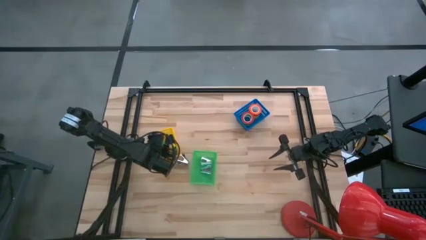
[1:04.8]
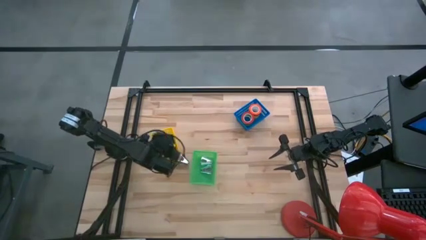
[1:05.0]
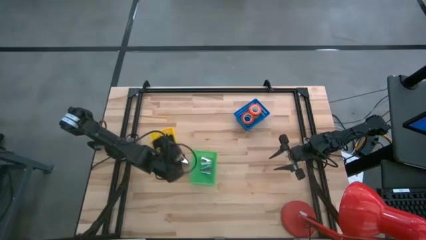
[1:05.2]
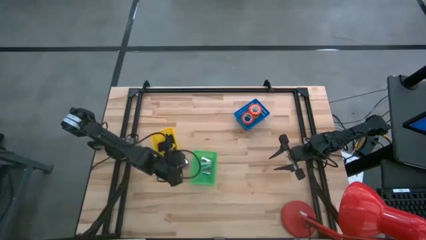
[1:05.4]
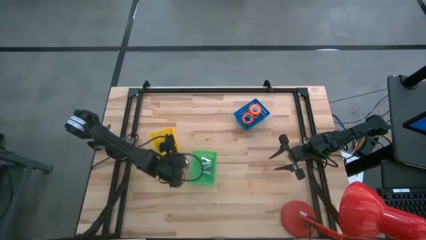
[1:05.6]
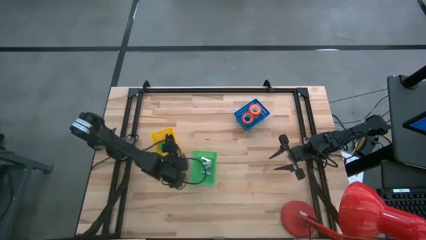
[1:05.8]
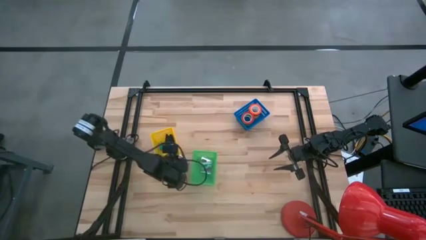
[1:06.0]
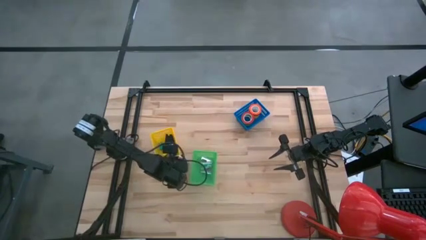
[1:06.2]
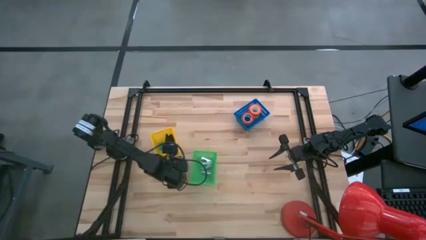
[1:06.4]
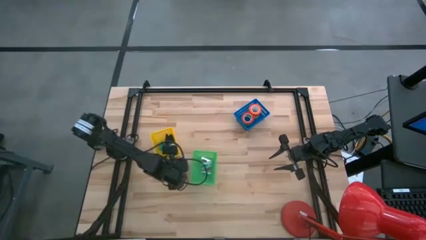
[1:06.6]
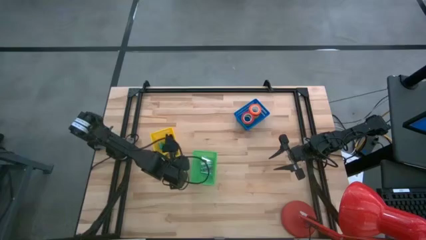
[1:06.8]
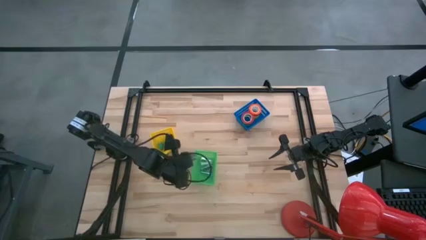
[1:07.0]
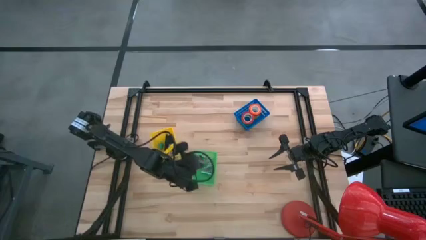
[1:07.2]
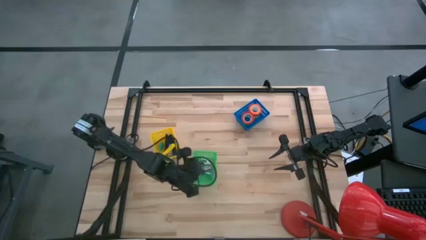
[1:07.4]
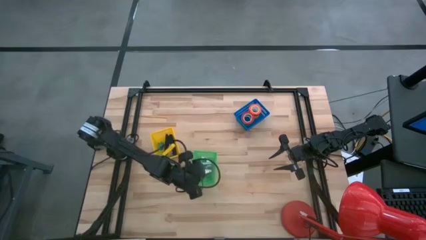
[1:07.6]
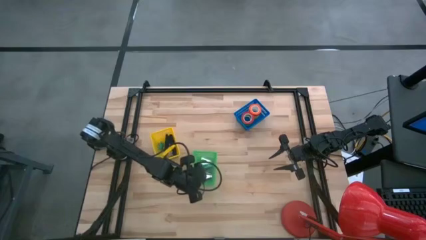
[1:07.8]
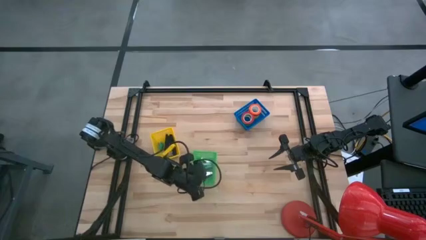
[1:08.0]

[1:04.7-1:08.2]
Task: Pick and place Stapler, Stapler remover, tape
Put the black staple remover into the green bin

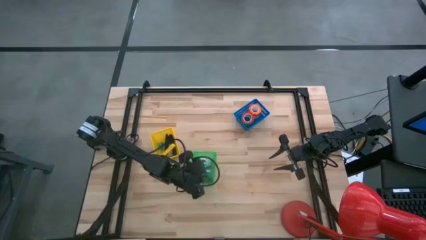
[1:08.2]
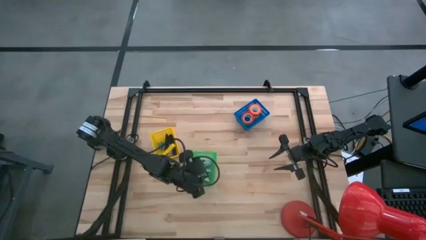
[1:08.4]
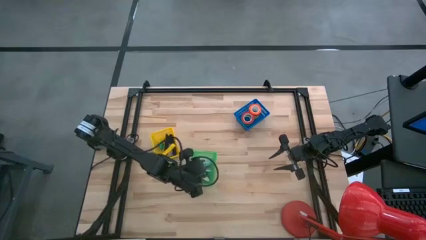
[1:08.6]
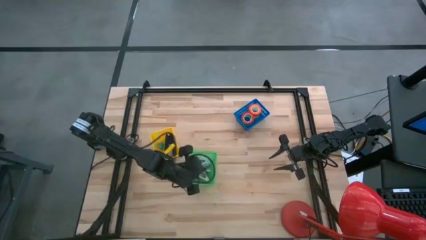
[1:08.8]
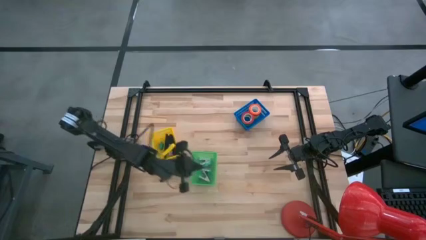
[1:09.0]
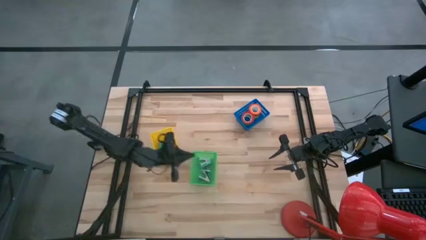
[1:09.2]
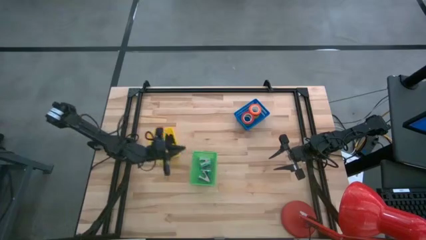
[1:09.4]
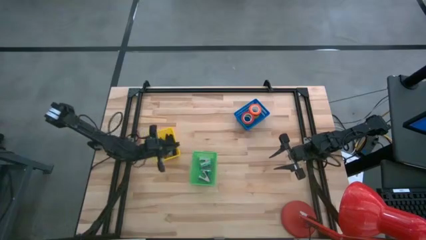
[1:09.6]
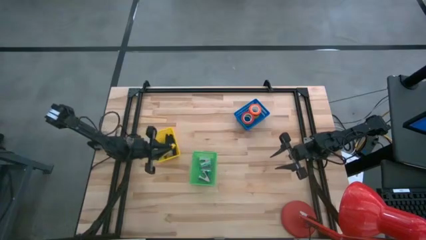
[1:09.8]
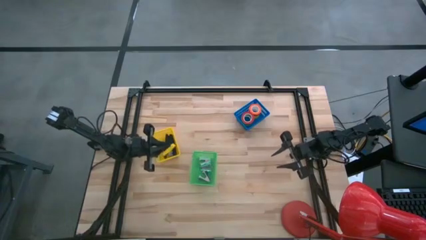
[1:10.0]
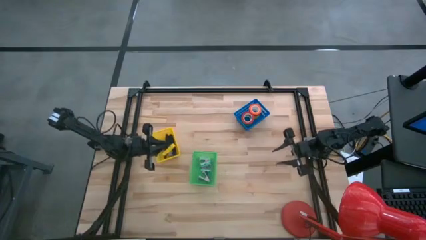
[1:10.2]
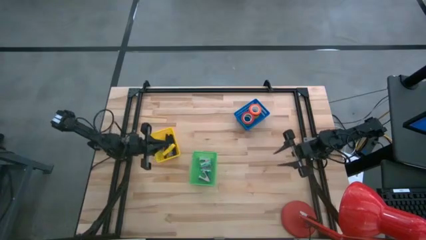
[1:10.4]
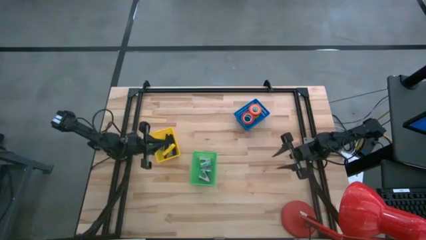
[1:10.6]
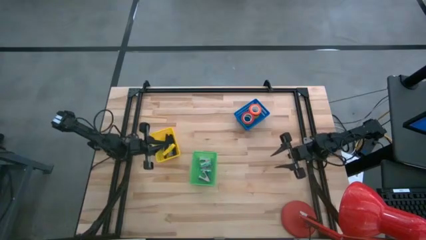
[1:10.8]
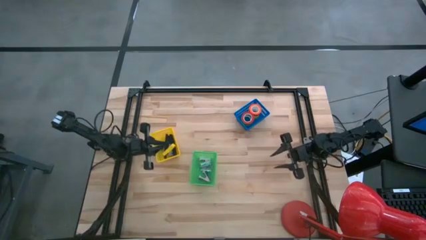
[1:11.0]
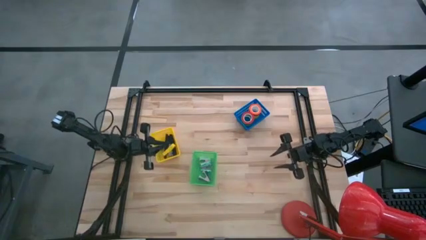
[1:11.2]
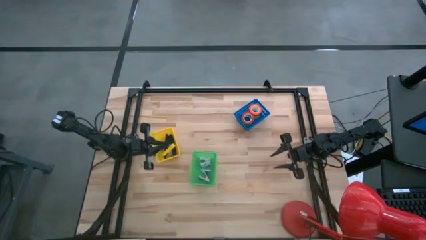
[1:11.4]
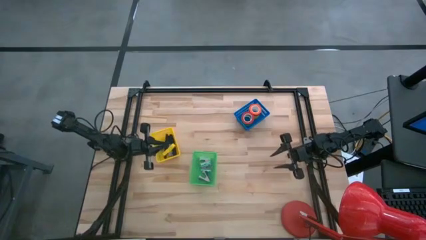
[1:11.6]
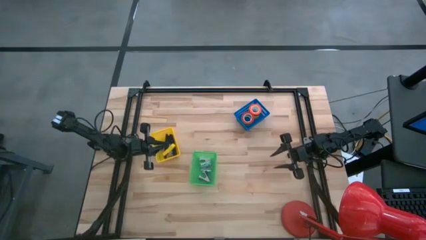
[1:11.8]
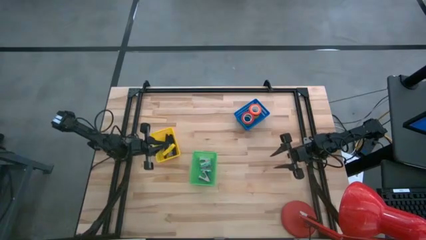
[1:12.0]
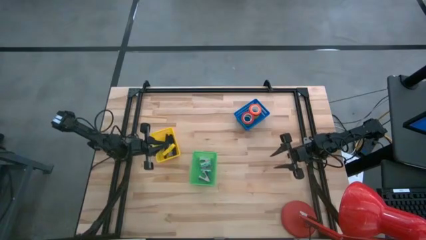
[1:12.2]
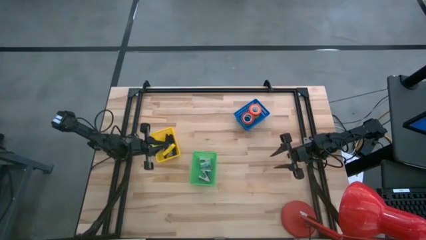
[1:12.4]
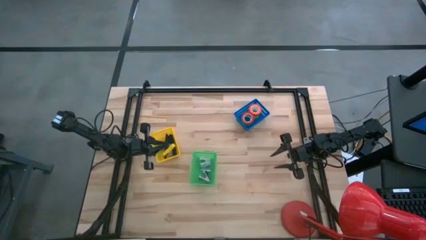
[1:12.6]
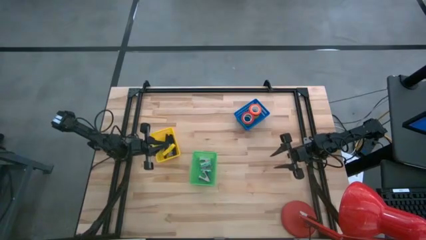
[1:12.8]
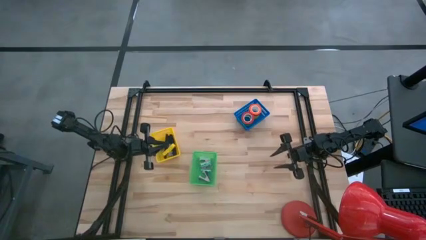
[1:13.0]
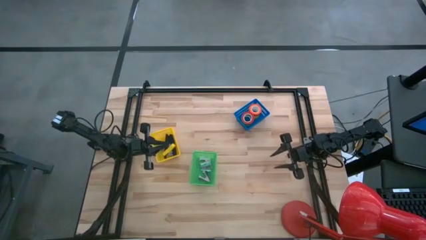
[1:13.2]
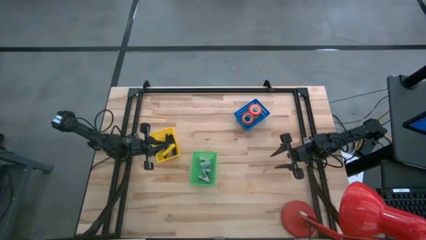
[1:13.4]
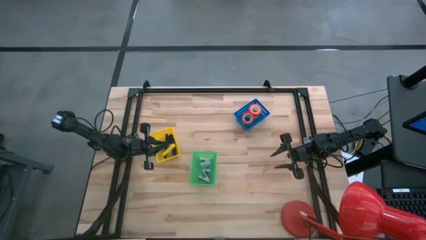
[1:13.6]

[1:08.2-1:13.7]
Return to Home Position

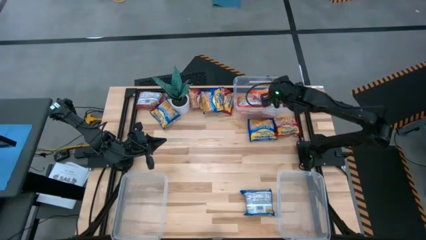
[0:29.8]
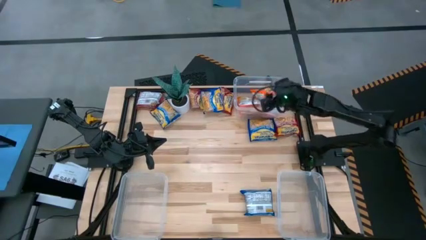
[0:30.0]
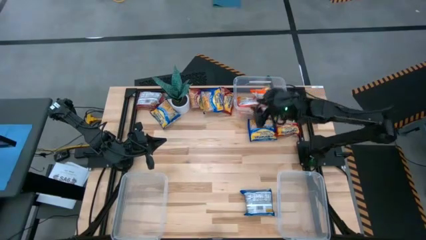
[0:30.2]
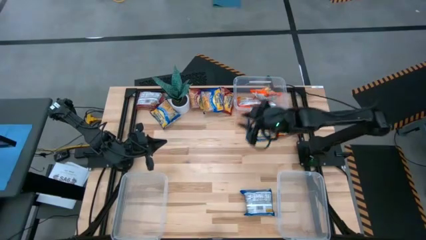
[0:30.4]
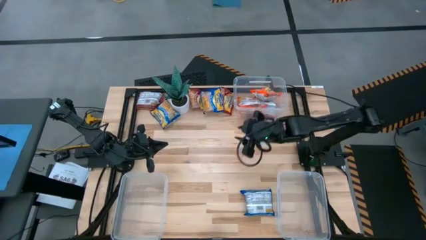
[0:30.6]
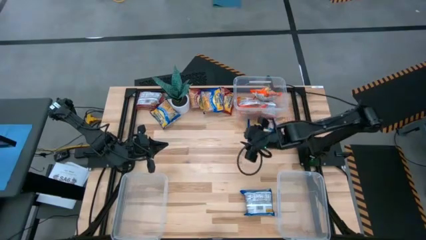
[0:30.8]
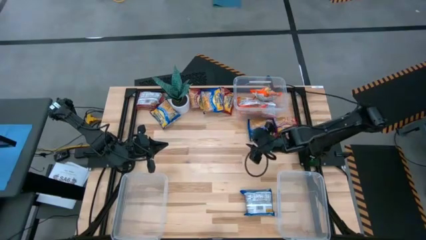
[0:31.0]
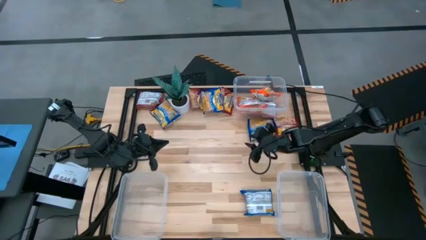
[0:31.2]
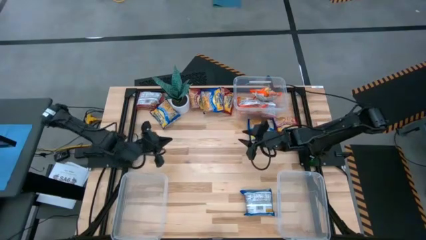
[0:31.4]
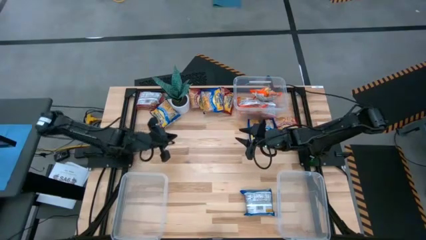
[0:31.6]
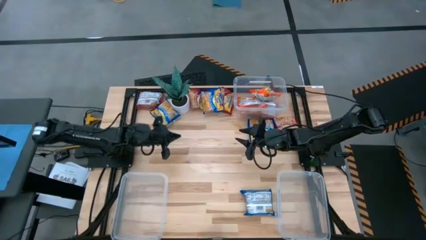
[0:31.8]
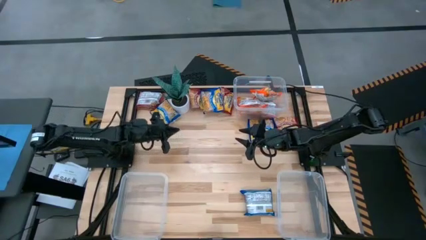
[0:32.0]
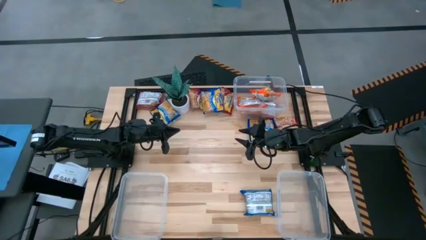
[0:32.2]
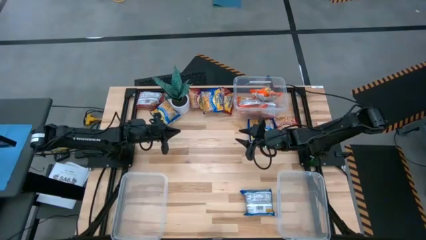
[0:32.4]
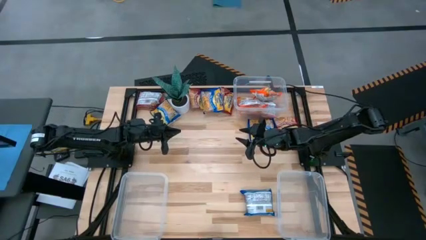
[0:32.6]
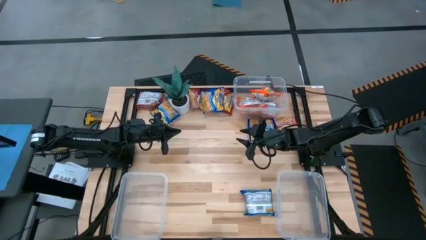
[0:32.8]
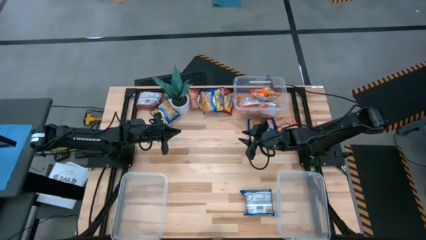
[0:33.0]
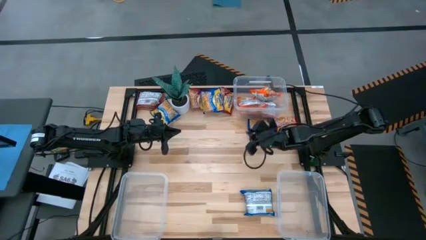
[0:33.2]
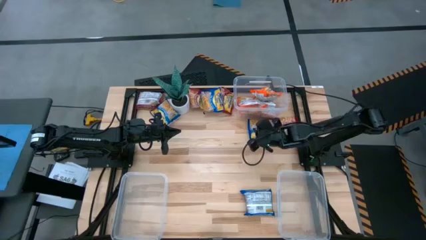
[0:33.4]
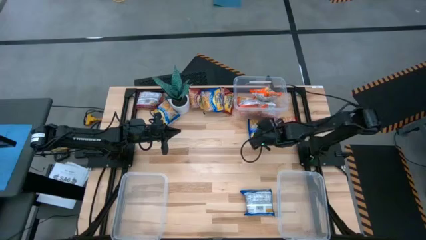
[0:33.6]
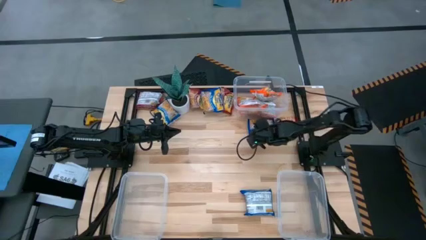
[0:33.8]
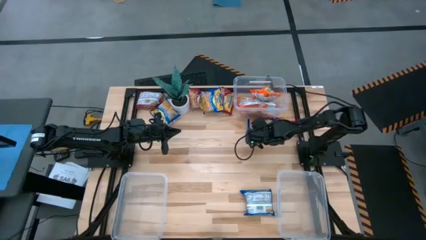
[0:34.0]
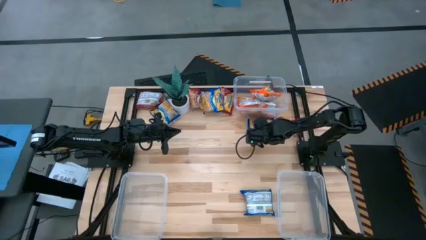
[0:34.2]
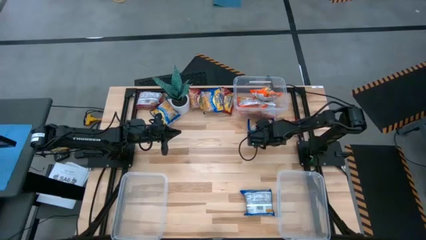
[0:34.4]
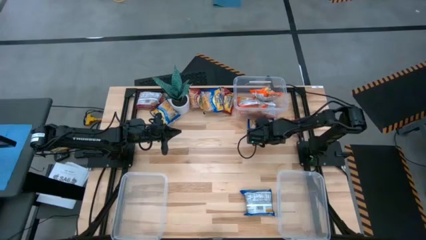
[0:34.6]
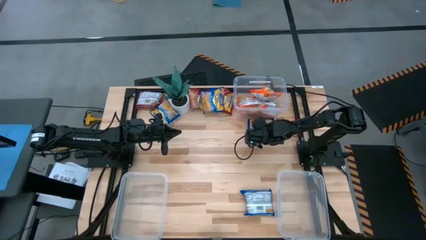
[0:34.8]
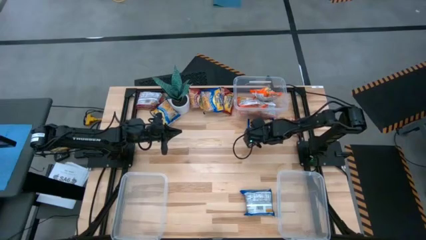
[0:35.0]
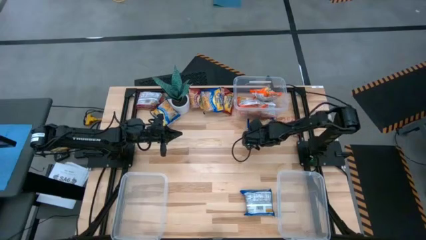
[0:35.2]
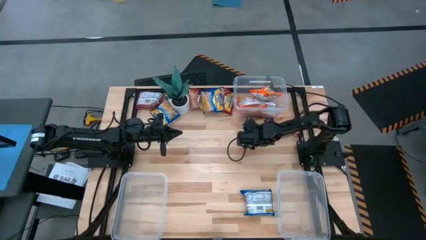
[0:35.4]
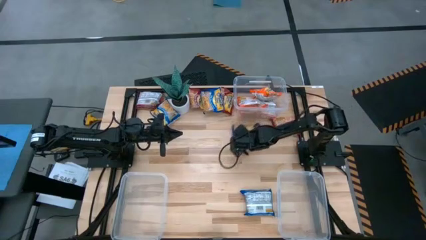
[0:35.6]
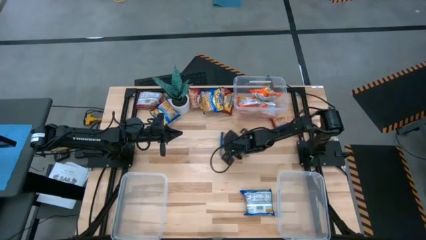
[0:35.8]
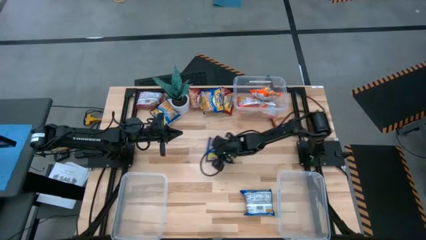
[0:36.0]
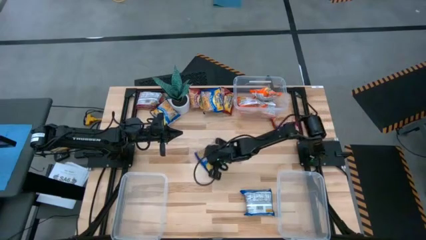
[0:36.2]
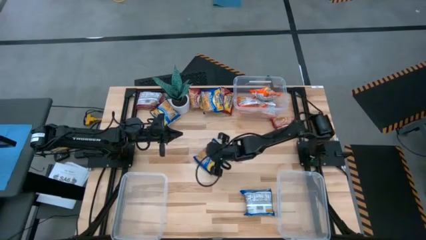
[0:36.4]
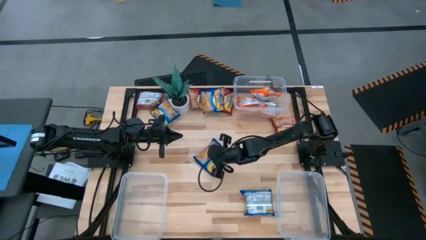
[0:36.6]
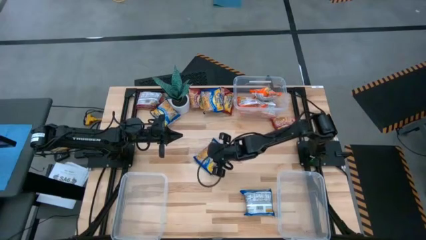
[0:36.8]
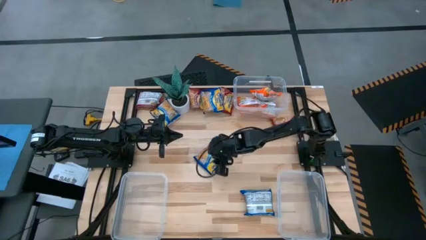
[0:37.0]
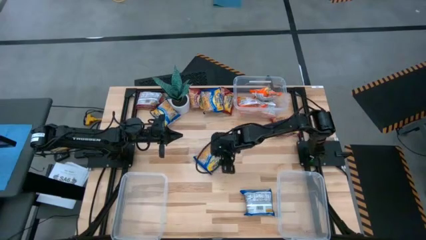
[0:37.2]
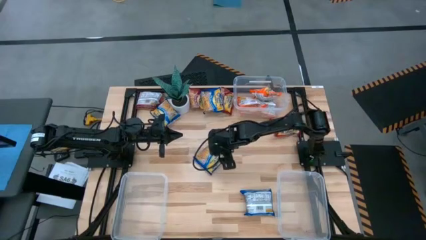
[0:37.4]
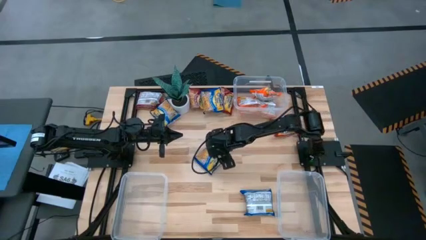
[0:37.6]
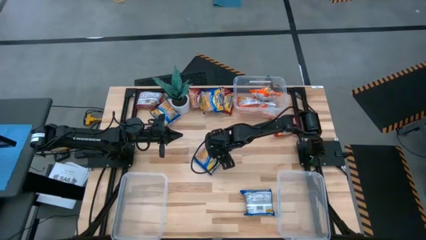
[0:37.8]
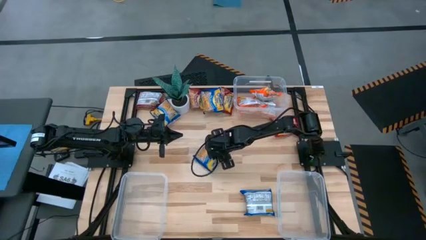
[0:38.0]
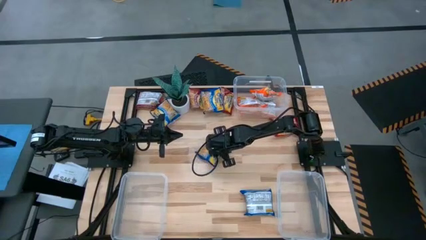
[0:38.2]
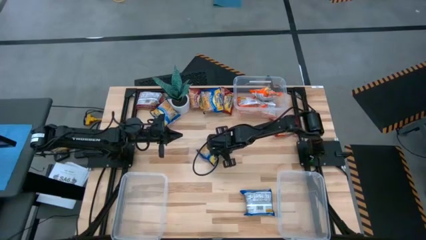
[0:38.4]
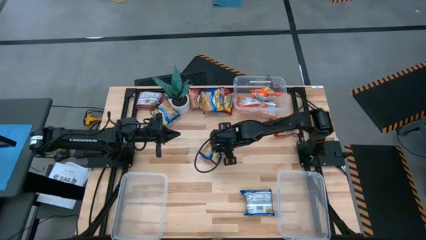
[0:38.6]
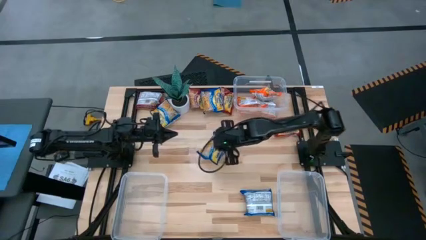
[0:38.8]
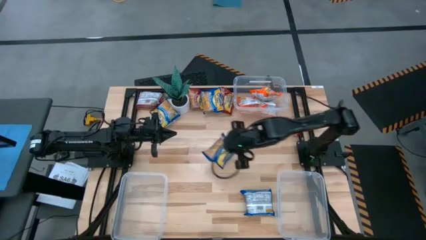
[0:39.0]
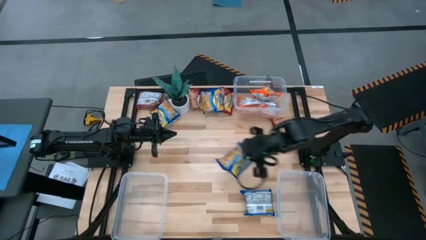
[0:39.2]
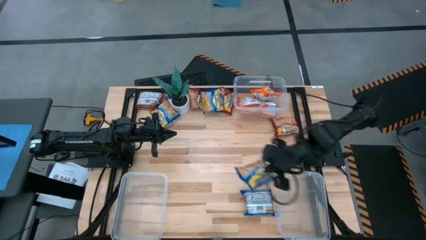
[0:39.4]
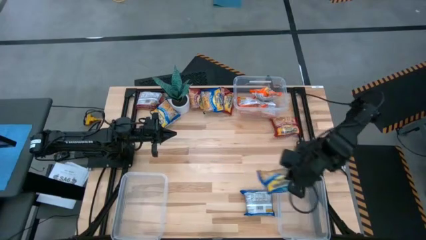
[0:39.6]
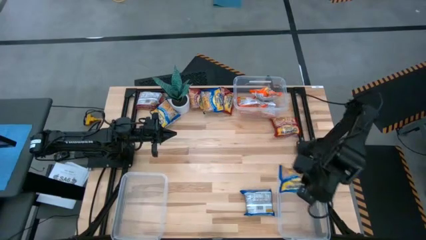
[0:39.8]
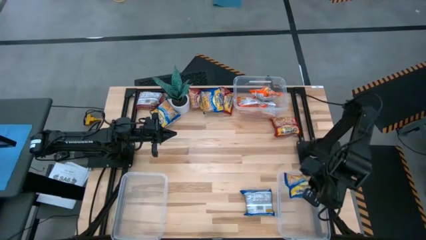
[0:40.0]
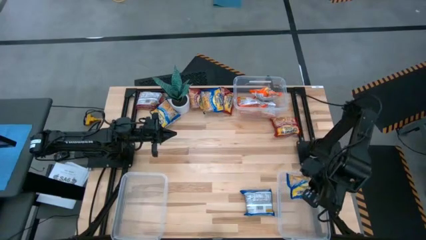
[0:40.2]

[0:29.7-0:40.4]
Task: Sort Maruchan noodles
Put the blue noodle pack into the bottom right transparent bin
